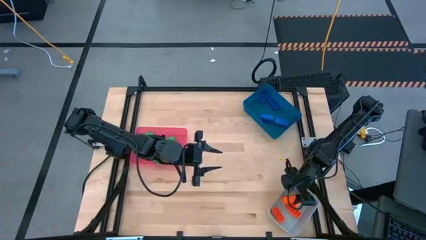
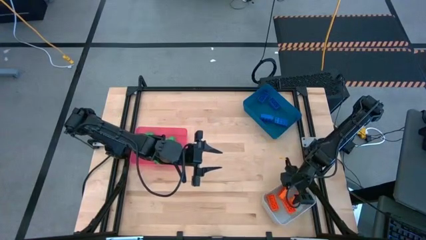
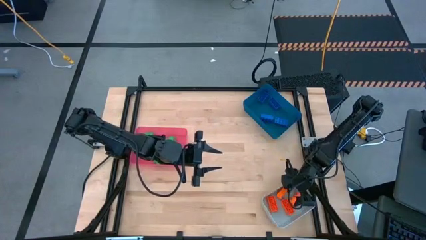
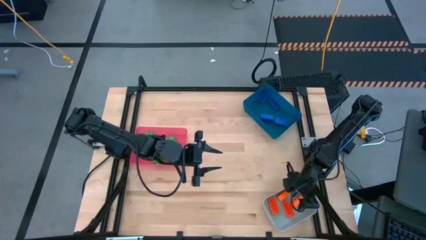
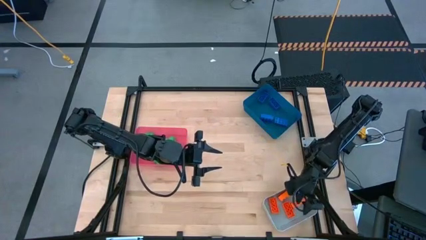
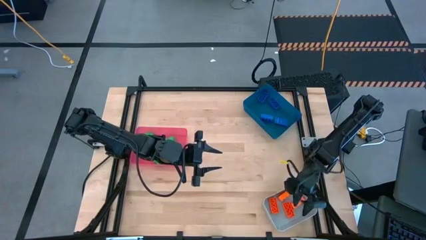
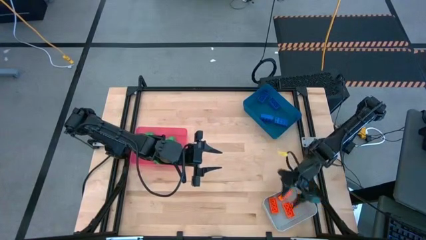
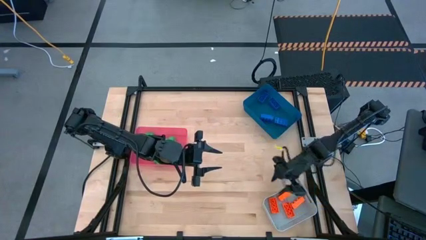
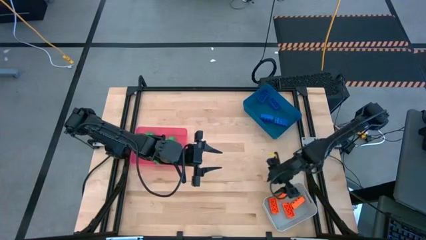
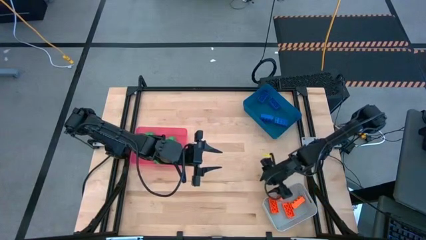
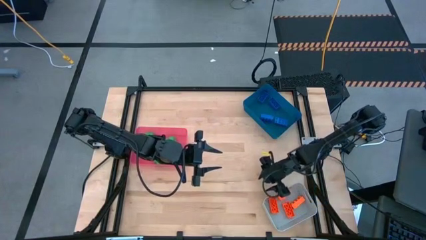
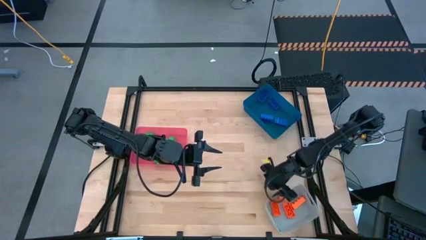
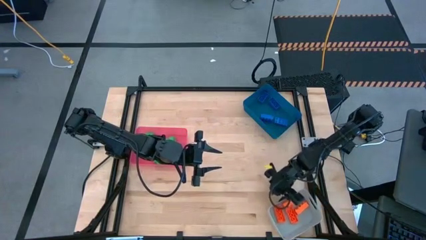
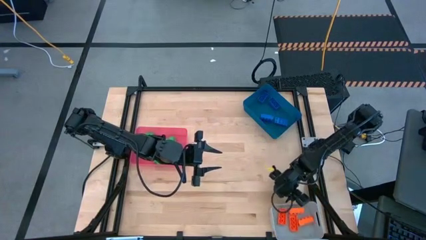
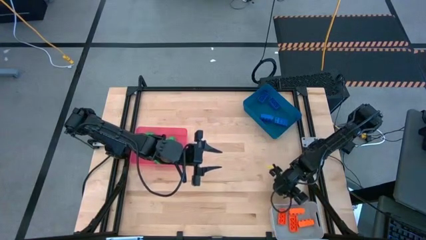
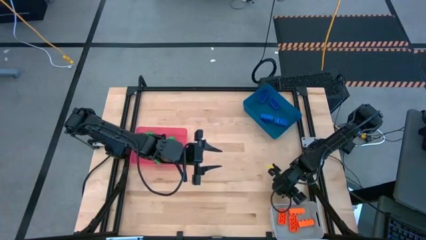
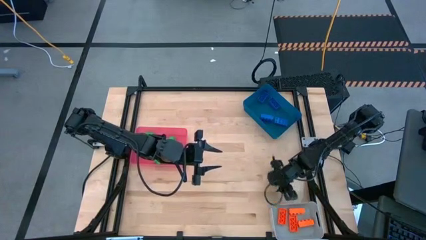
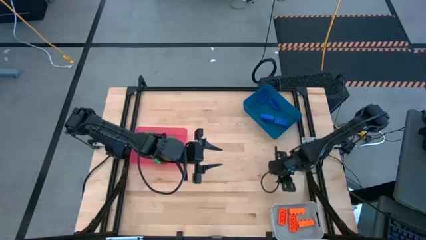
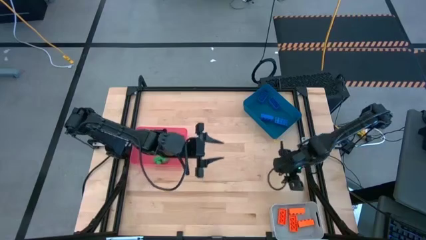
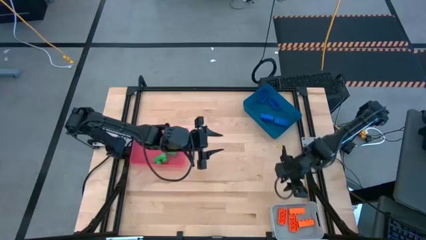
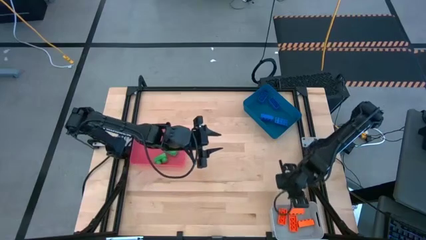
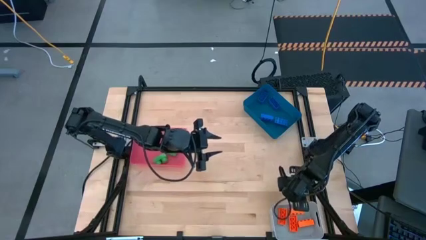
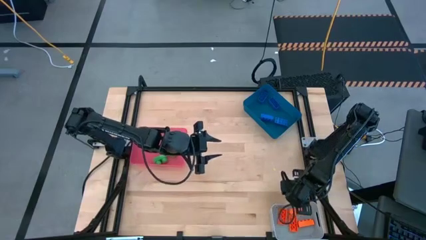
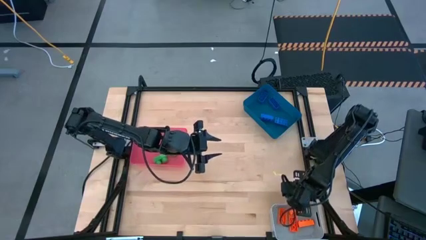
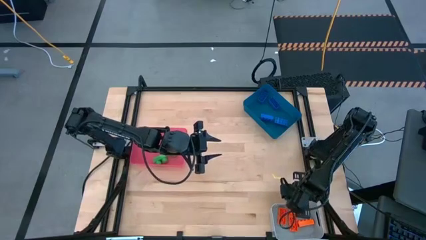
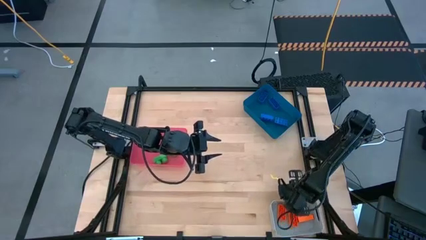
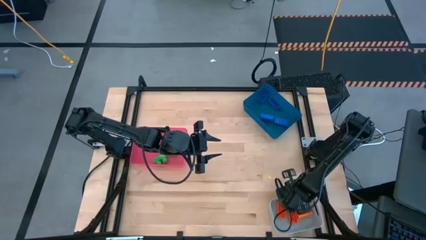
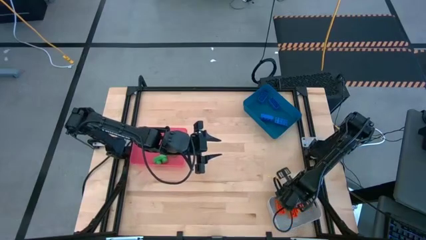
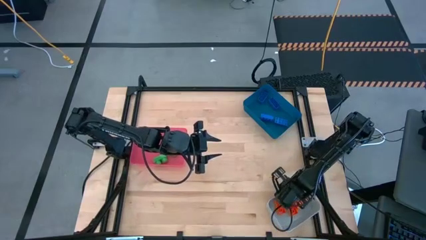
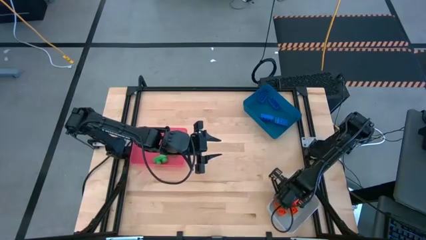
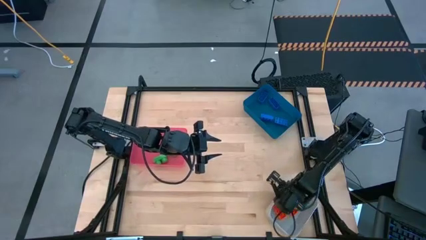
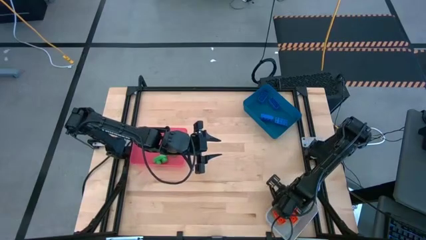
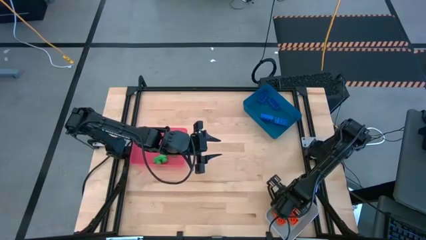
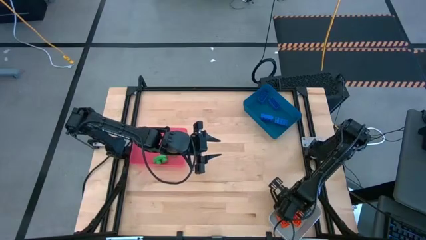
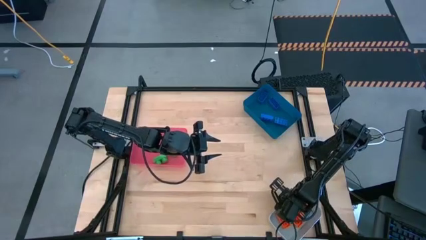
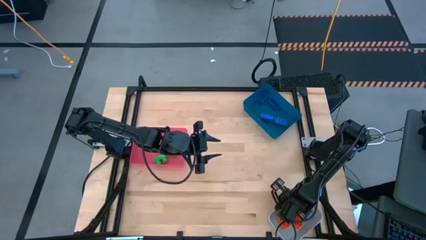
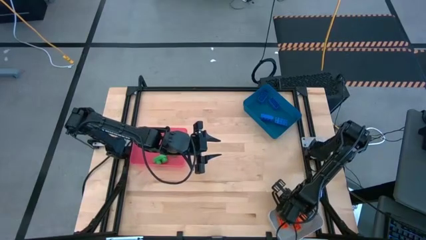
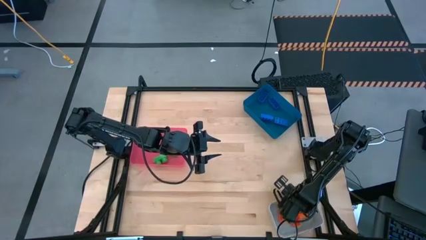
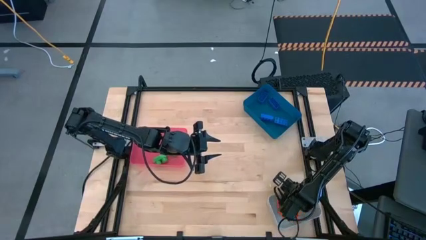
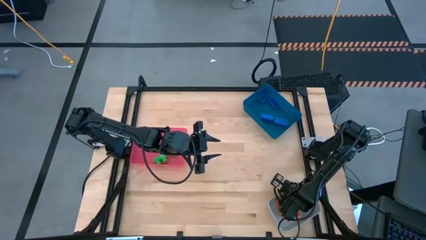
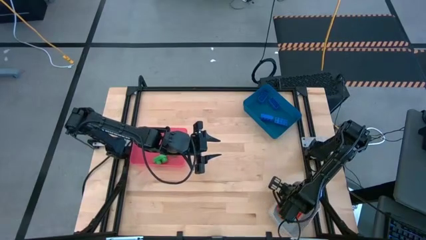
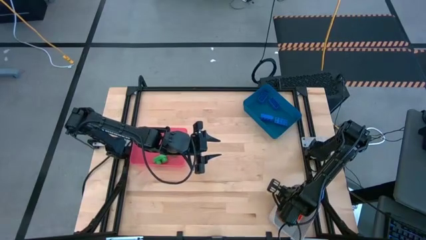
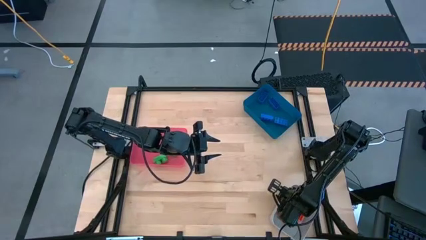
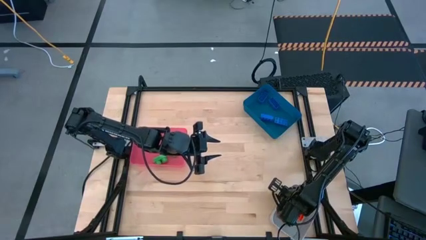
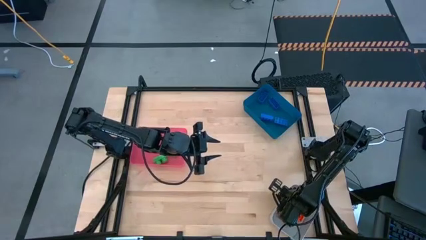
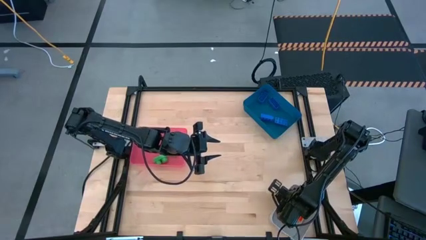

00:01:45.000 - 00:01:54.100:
Task: Sort & place blocks by color
Adjust the gray bin
